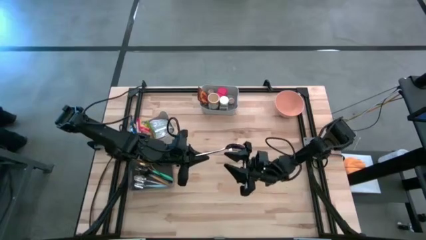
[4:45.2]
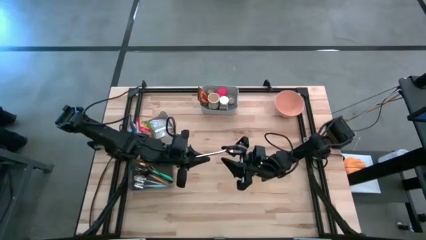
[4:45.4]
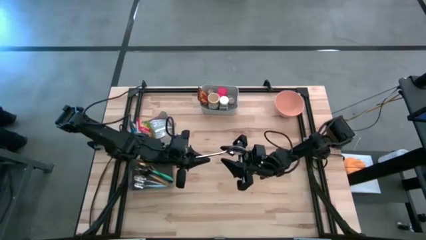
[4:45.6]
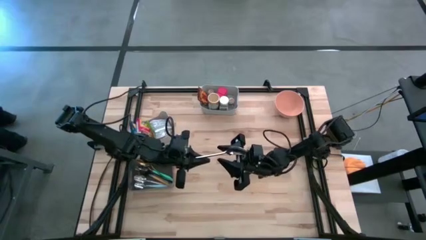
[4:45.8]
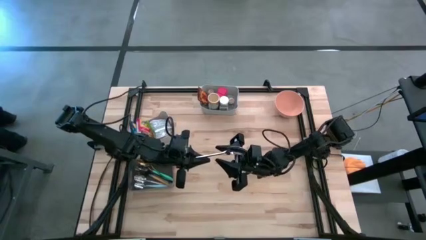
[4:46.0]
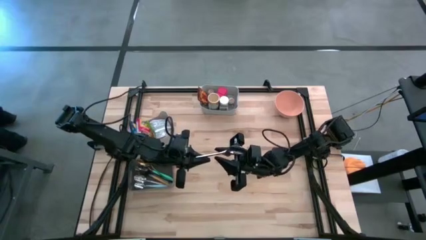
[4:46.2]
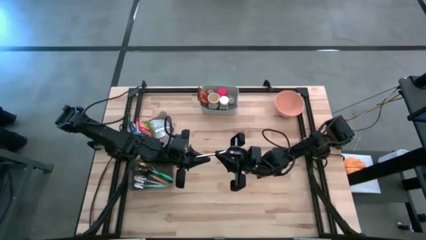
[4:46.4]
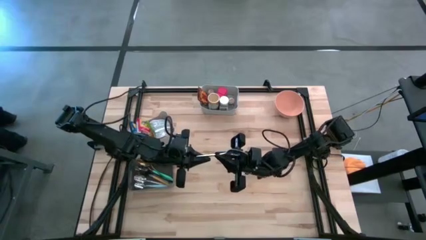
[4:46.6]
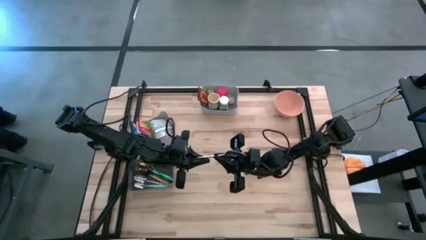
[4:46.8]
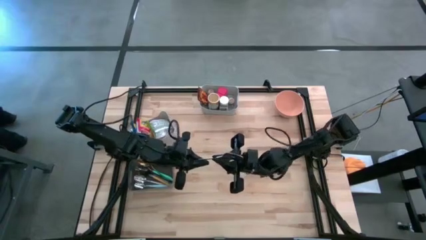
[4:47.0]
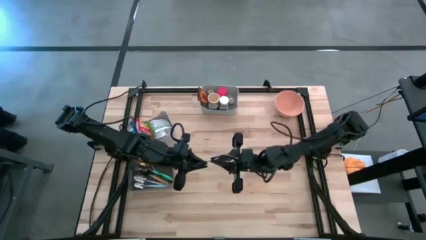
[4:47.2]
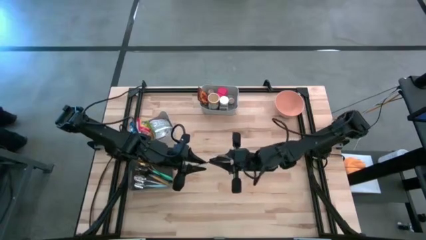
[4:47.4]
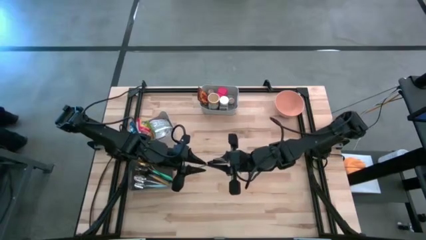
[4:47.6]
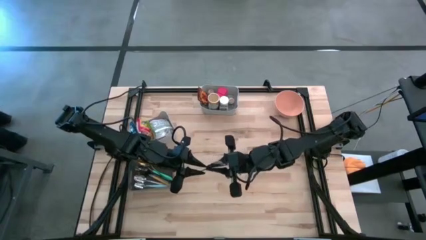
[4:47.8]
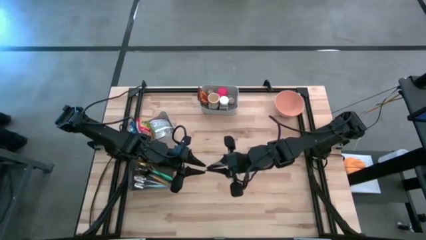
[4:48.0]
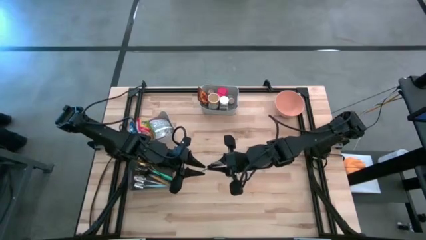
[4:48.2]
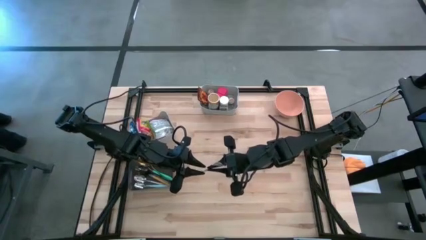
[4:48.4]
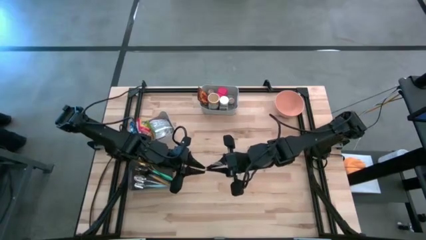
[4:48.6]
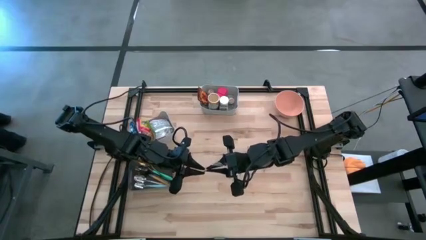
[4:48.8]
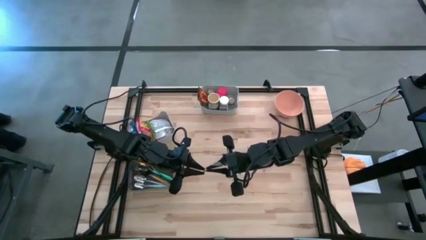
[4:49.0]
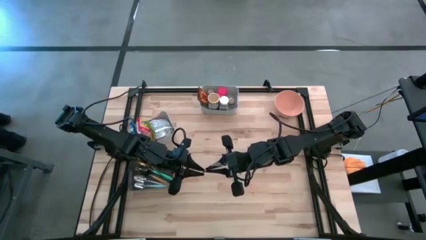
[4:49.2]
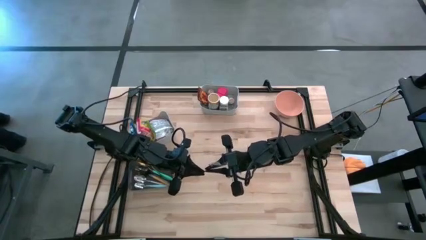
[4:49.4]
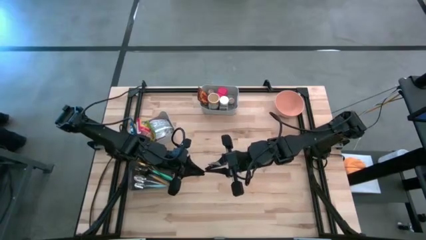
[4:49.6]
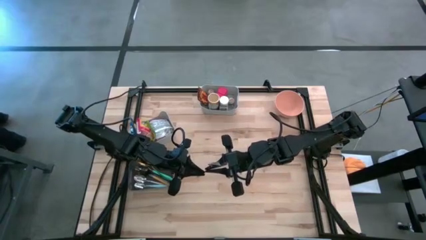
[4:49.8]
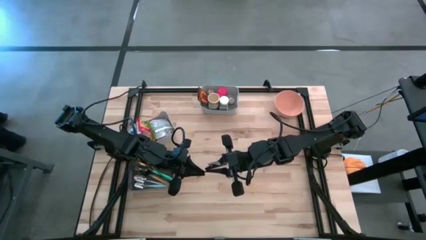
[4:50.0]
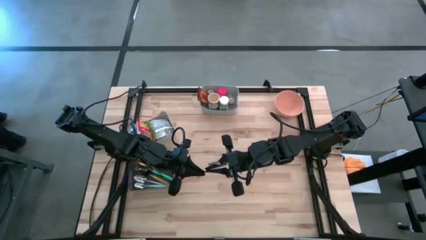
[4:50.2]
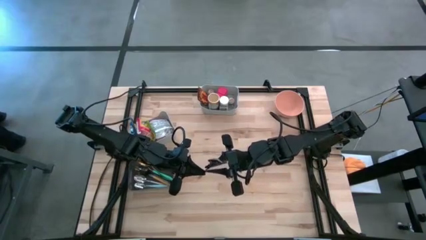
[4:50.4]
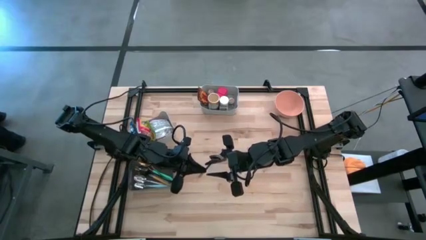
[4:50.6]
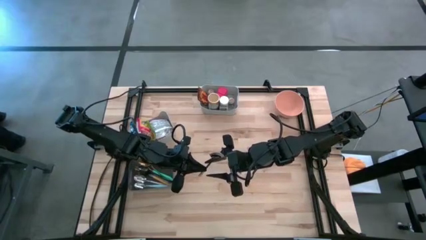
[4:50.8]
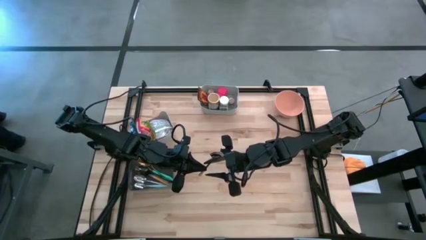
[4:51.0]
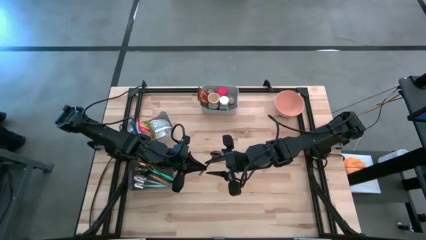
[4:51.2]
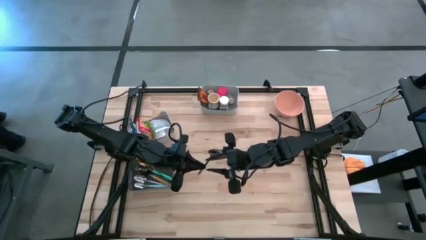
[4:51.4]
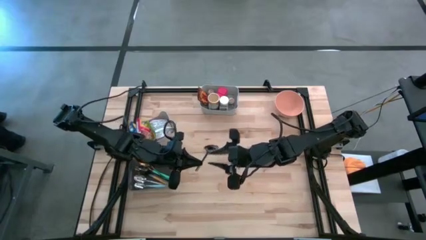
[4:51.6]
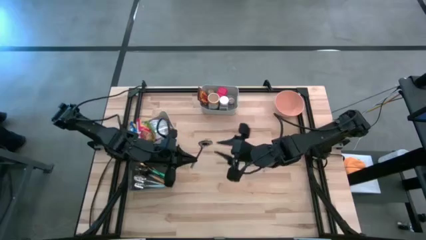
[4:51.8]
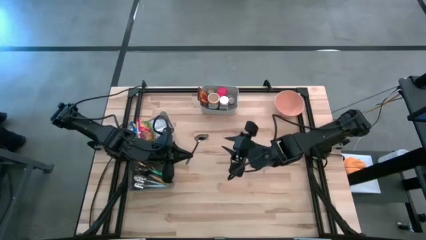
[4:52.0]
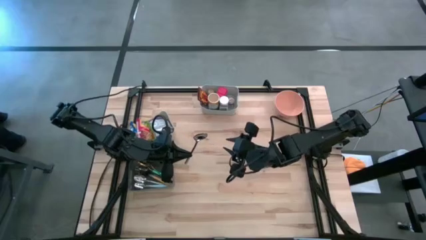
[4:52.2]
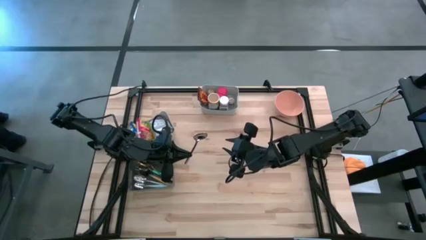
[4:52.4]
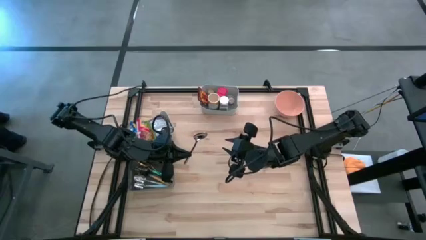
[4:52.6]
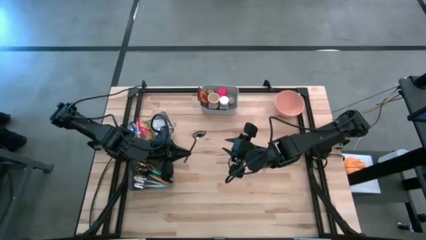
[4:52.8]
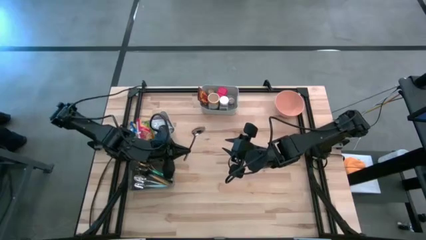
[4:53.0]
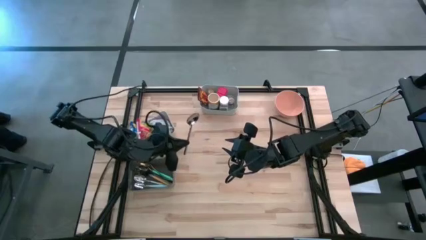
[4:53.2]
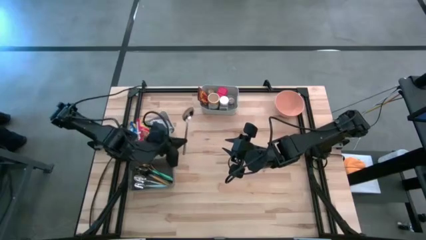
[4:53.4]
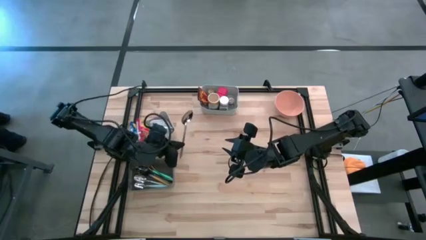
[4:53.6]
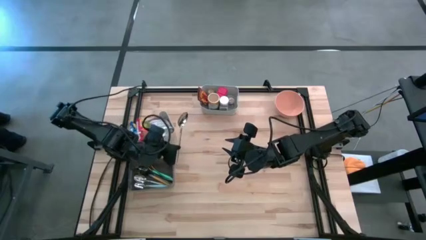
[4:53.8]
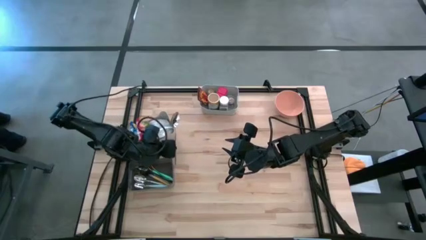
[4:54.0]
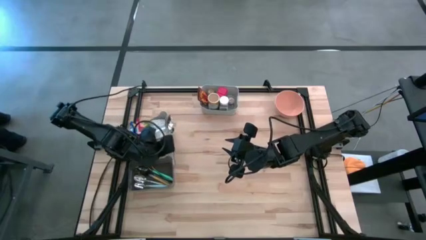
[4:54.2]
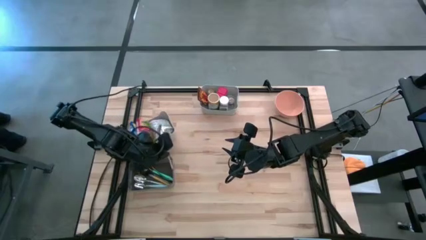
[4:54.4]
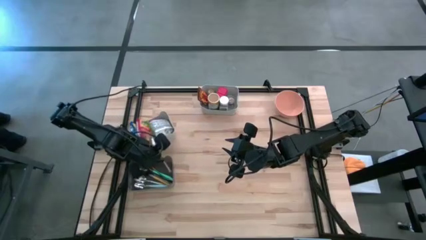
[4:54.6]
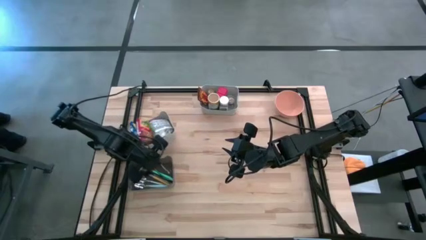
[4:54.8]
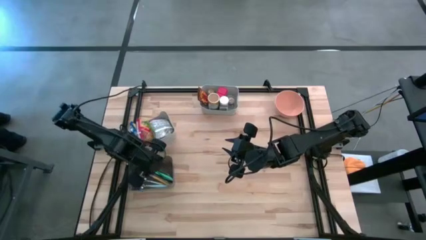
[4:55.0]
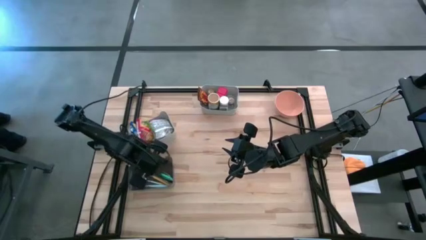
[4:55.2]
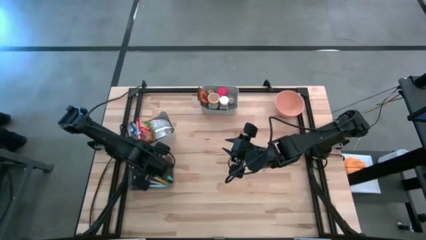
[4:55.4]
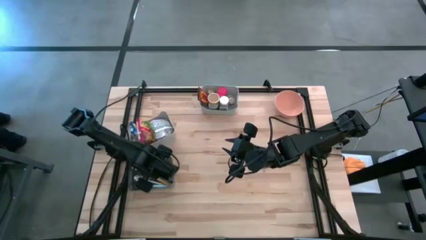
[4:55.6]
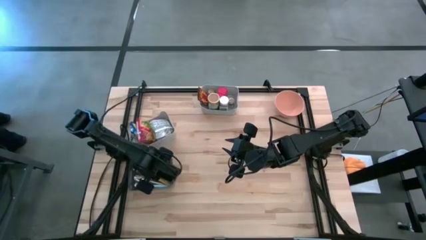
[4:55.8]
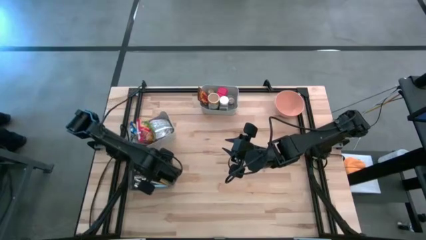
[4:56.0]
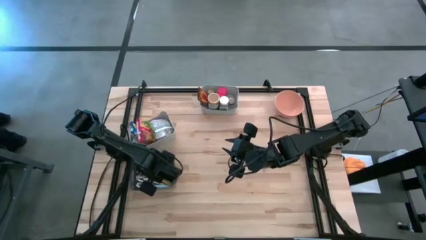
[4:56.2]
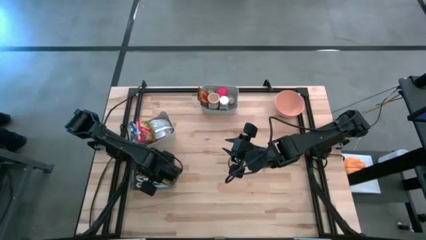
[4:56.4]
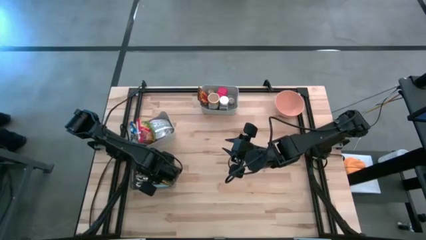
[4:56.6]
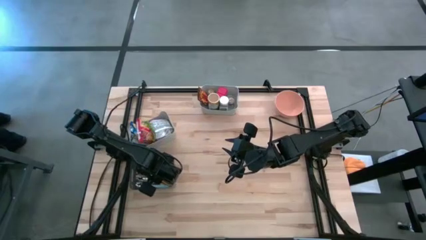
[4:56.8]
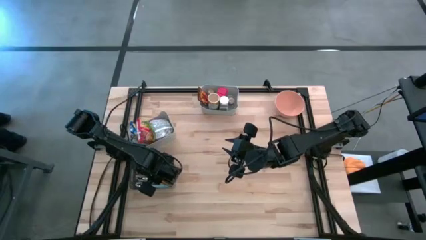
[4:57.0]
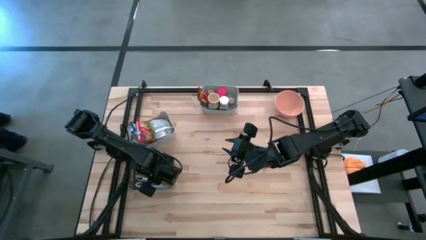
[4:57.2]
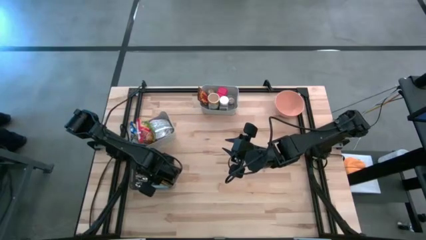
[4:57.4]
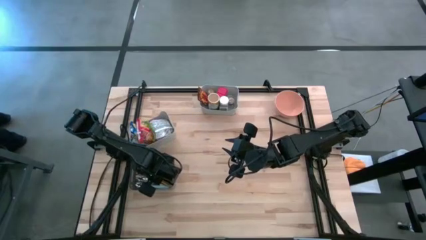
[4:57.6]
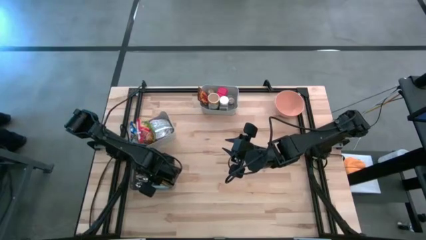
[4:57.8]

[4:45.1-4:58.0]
Put the silver spoon into the black bin
